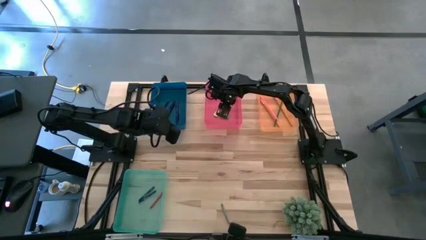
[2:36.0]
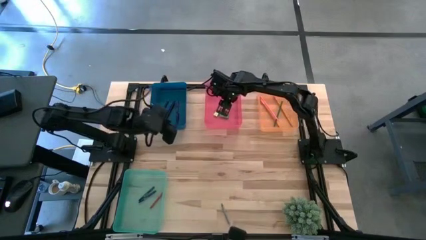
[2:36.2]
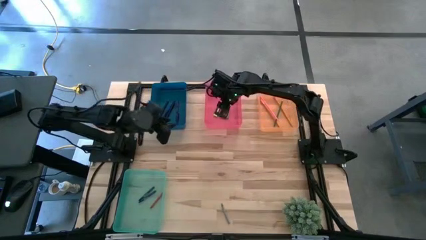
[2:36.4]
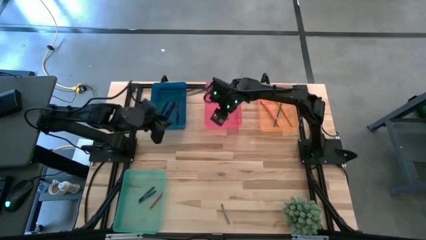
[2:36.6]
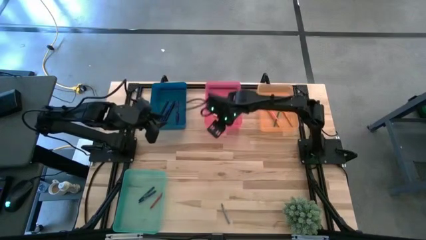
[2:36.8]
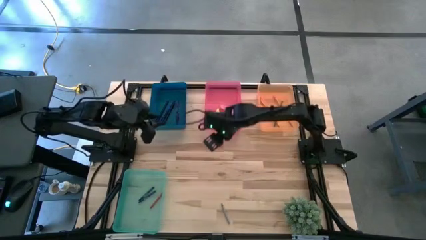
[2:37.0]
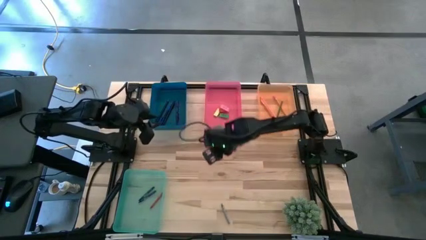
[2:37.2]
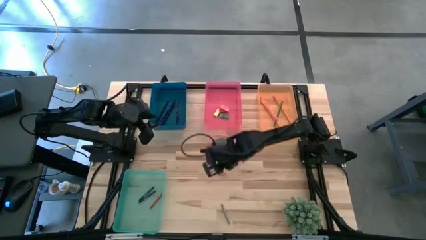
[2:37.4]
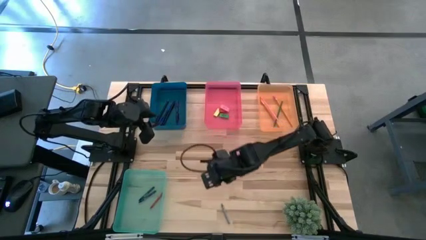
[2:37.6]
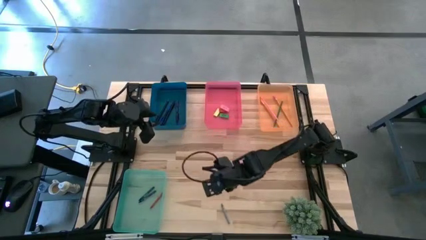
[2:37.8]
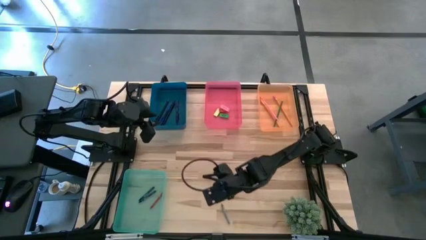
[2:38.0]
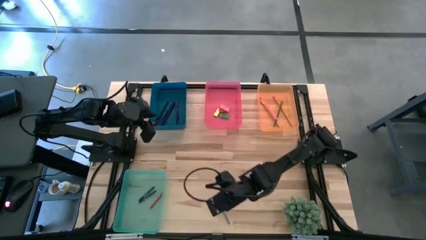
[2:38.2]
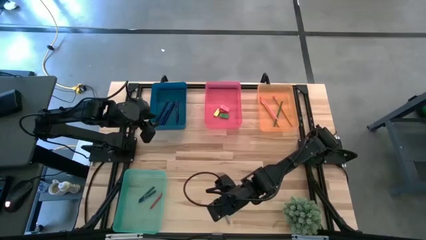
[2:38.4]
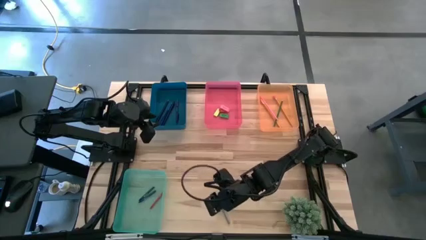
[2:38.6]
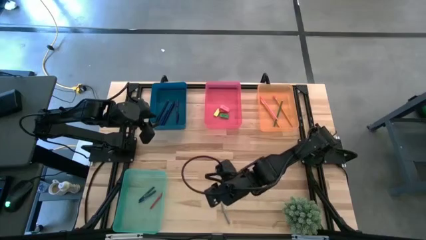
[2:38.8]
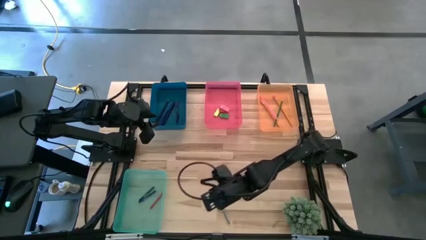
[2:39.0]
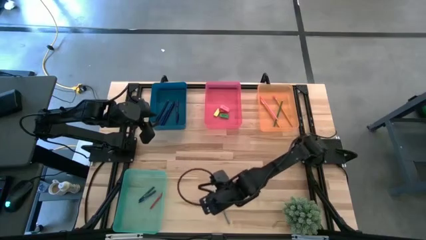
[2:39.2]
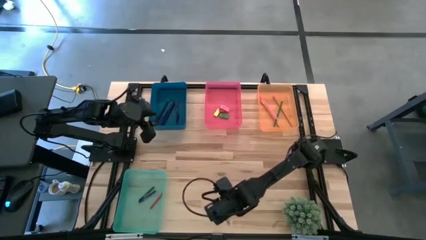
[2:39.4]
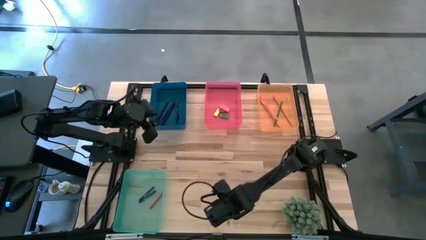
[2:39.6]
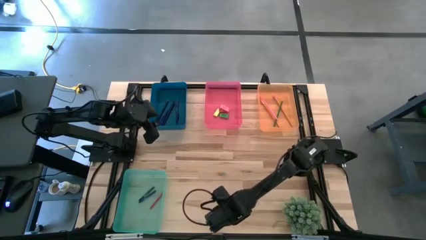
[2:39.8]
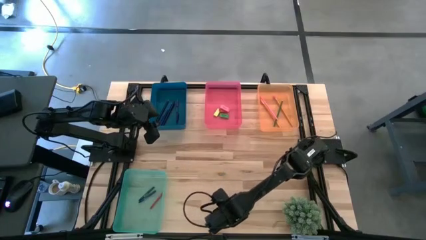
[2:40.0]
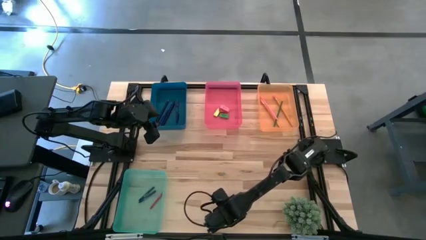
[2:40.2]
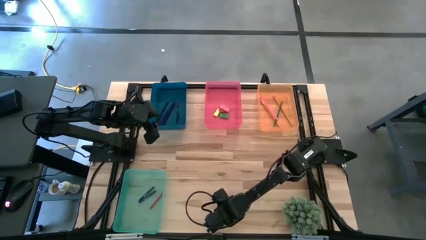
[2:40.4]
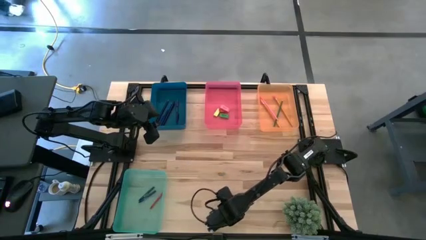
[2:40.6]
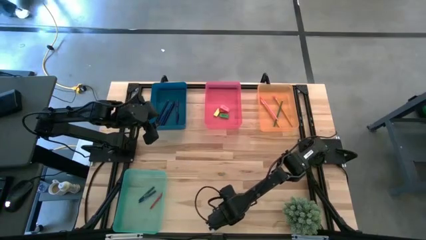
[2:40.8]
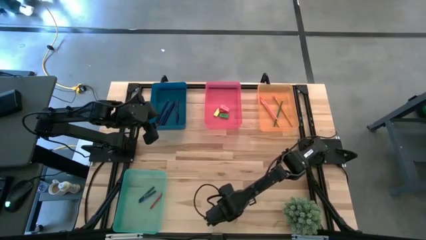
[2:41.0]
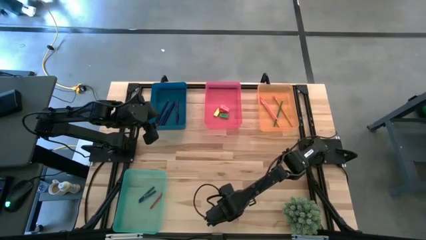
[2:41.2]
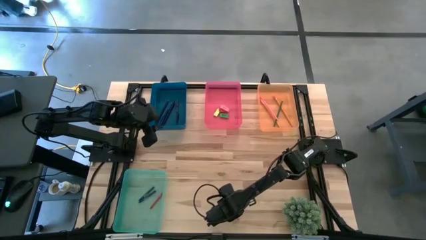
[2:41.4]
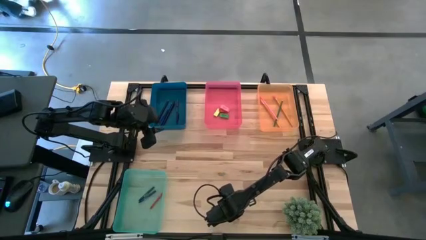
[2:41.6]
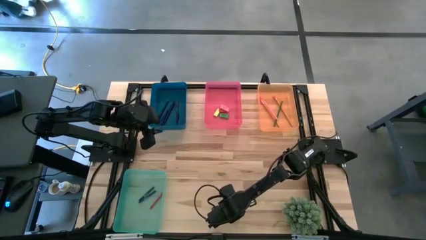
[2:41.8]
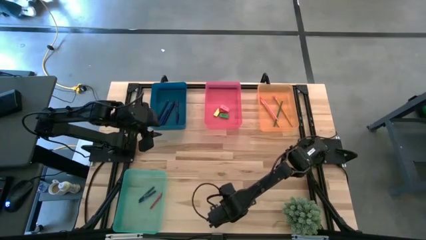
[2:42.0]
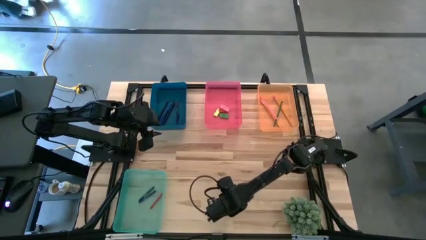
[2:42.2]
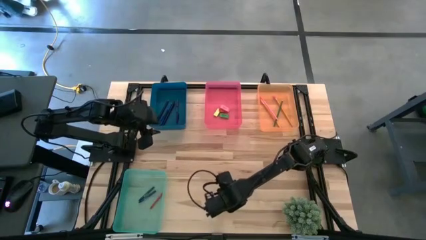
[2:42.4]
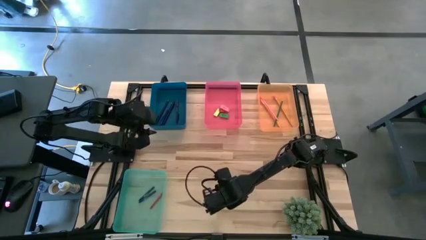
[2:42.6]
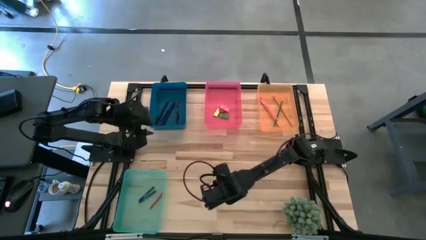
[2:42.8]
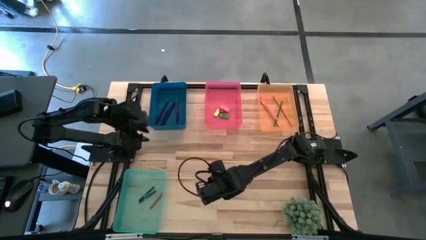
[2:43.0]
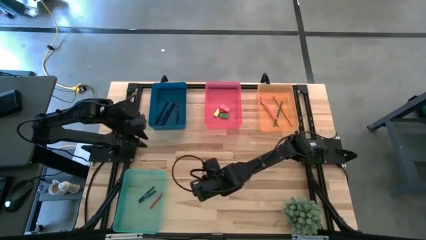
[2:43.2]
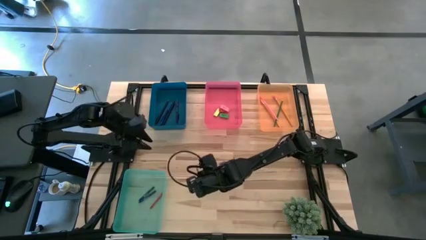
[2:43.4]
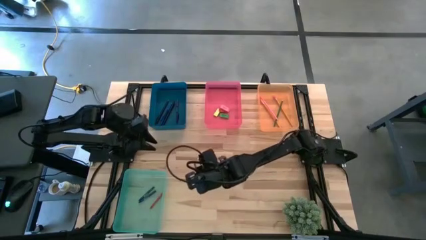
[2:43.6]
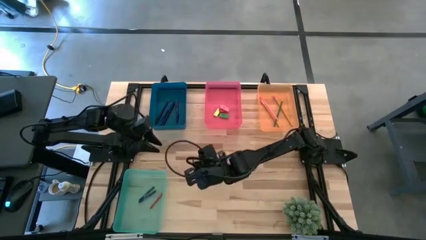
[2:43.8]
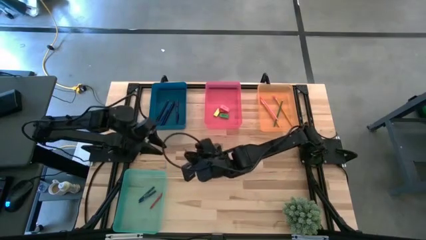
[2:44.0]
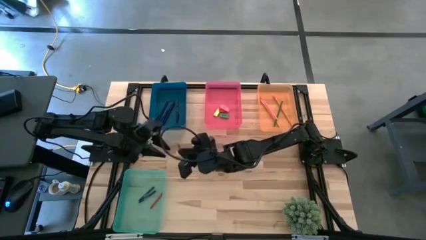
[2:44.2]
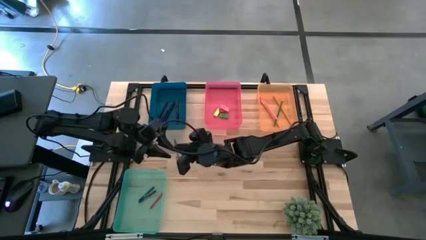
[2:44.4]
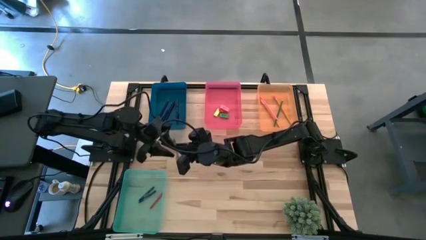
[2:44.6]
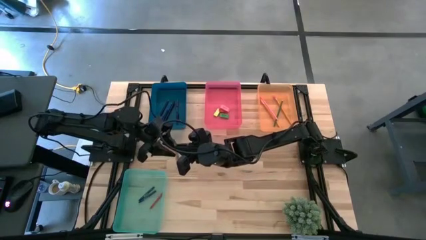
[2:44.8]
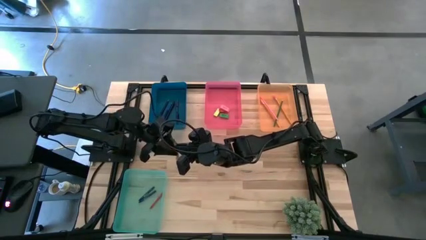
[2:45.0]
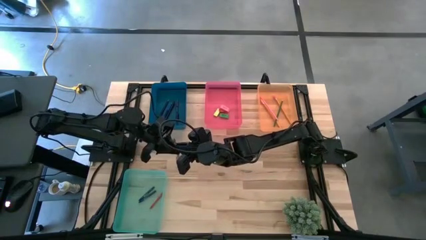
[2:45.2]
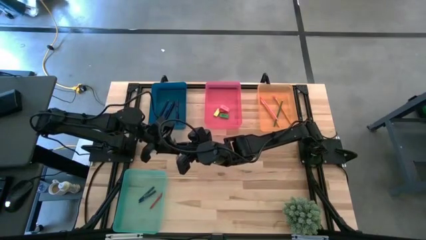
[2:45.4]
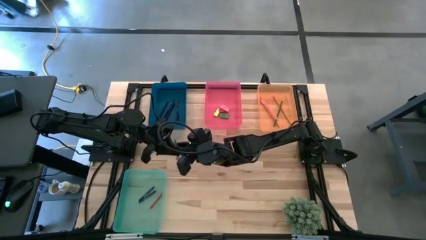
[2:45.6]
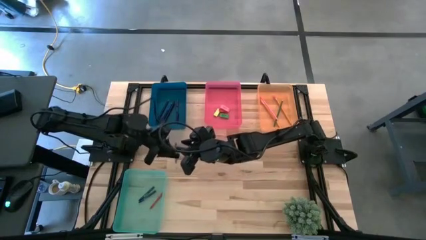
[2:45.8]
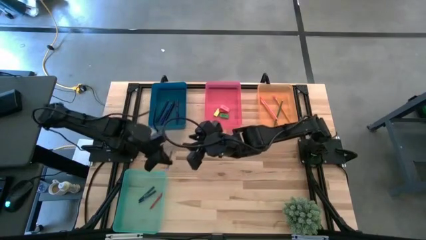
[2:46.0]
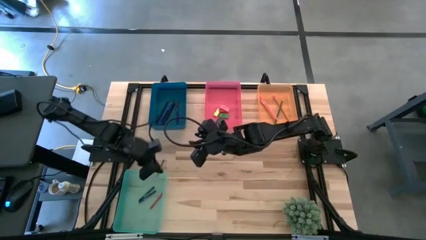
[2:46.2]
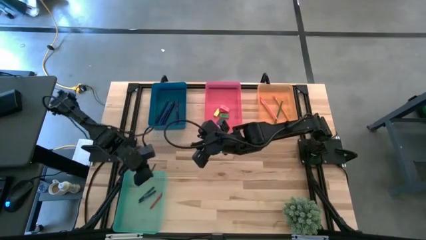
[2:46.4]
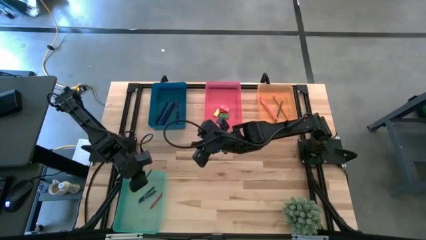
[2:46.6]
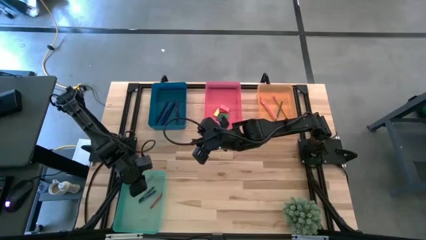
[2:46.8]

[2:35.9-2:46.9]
Task: Sort crayons/erasers/pens/pencils in bins
Put the gray crayon into the green bin

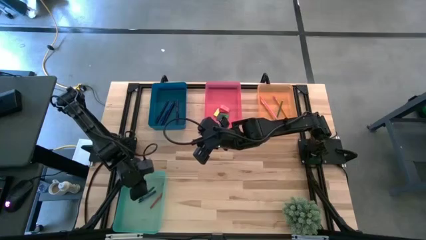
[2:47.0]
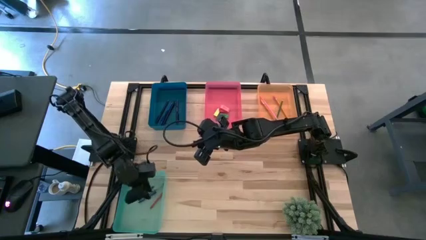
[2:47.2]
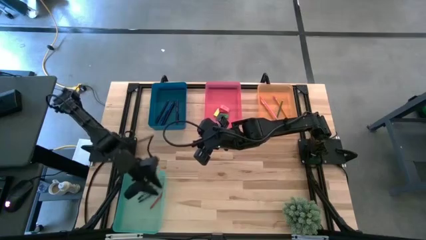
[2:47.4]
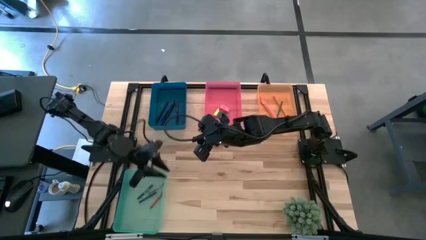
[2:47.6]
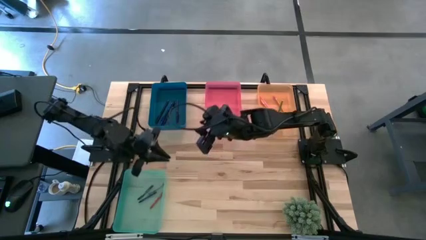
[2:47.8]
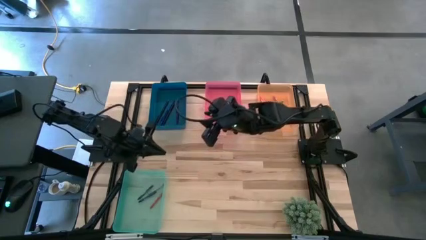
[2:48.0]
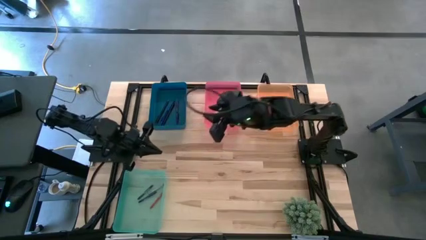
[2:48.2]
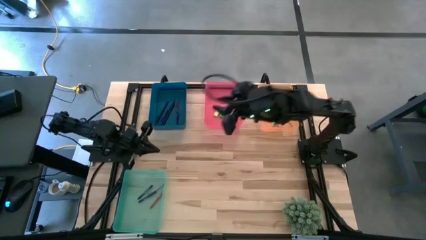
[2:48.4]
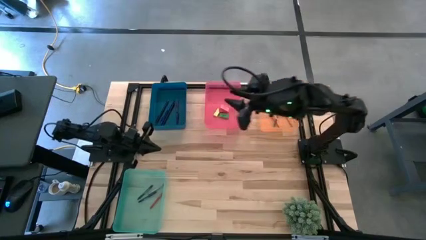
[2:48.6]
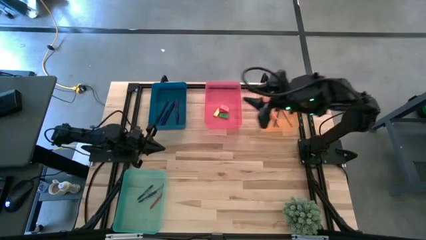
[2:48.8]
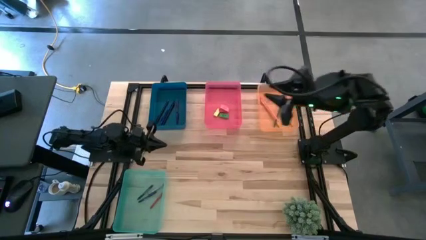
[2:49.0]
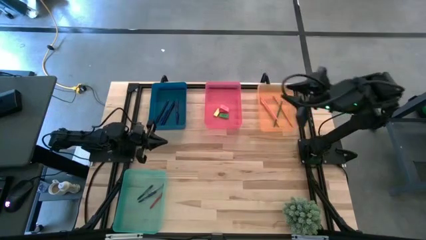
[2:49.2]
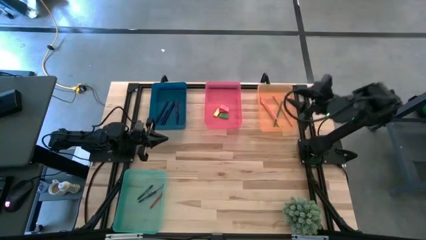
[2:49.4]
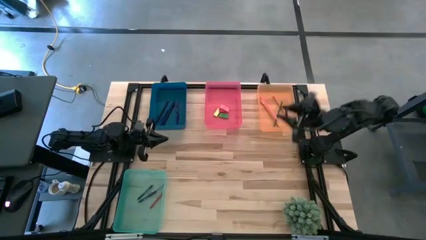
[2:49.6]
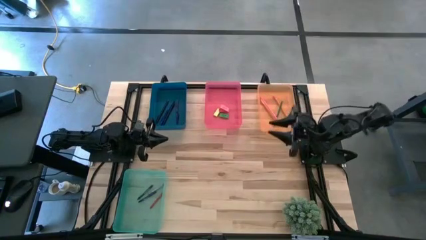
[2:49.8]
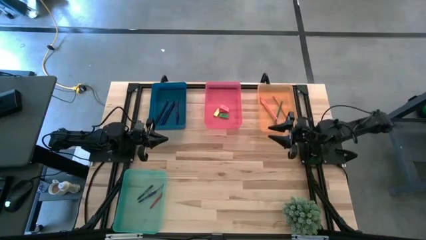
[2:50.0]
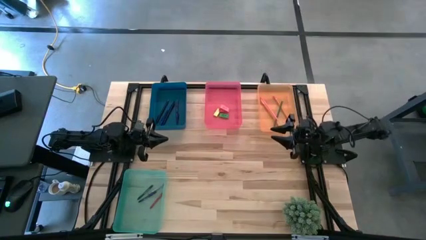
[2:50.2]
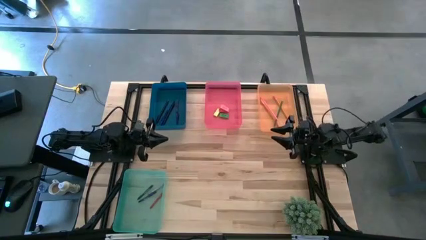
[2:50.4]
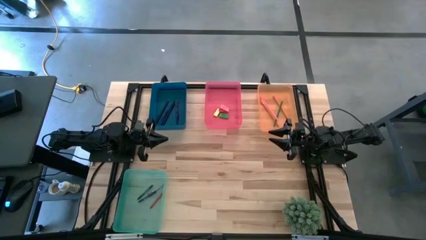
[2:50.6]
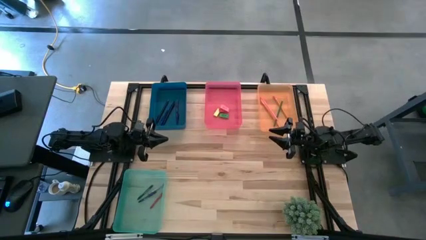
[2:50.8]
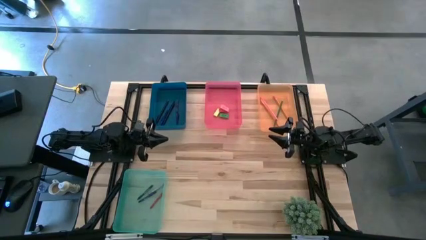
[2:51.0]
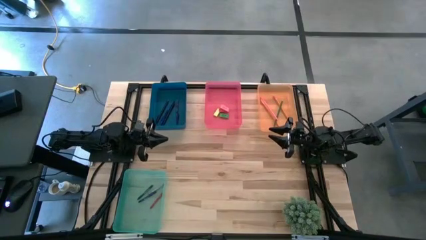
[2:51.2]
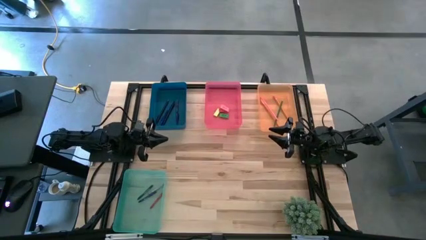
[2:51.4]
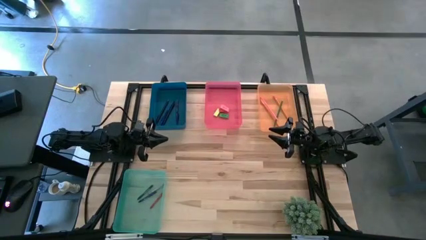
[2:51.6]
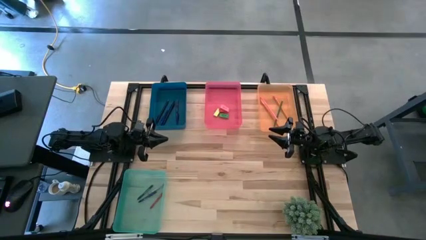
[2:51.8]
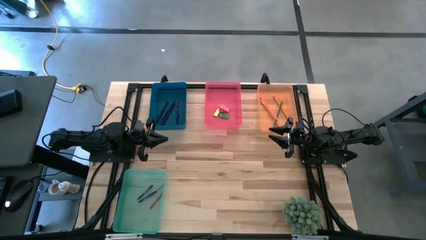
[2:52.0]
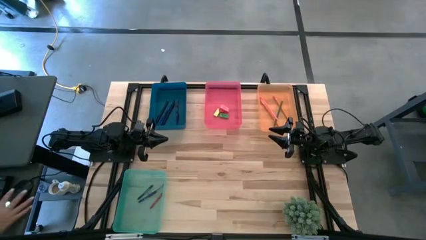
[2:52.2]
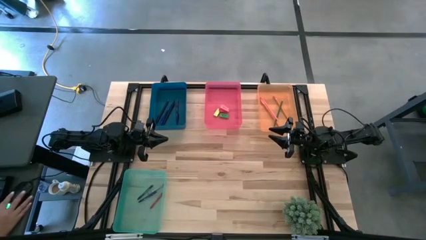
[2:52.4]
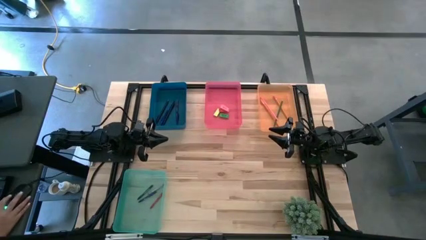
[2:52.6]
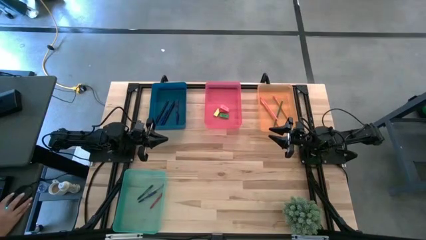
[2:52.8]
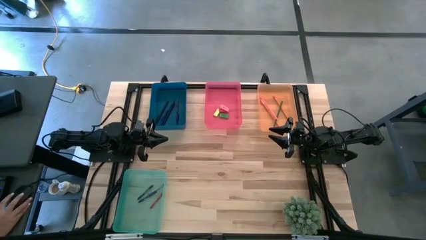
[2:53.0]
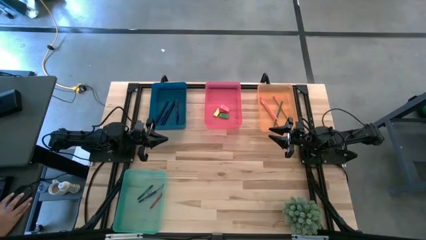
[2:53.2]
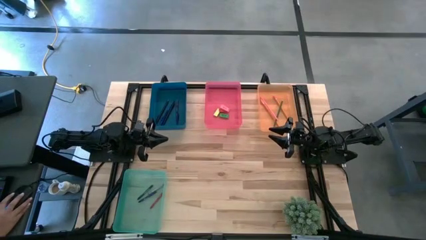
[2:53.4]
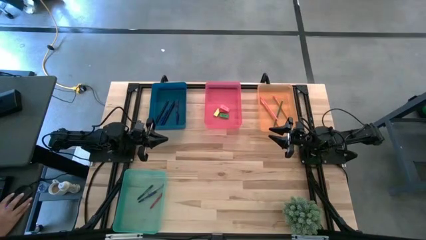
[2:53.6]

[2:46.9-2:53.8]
Return to Home Position
